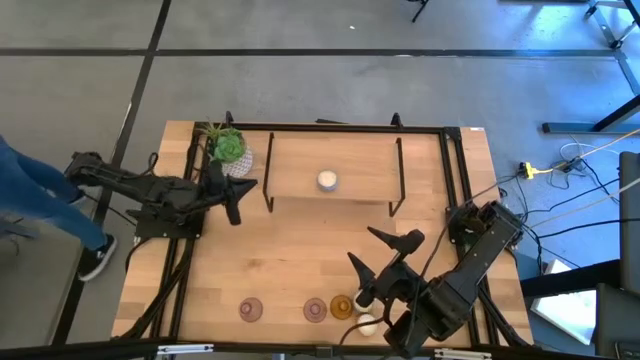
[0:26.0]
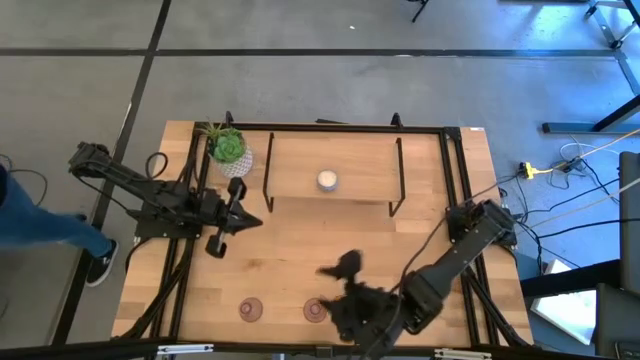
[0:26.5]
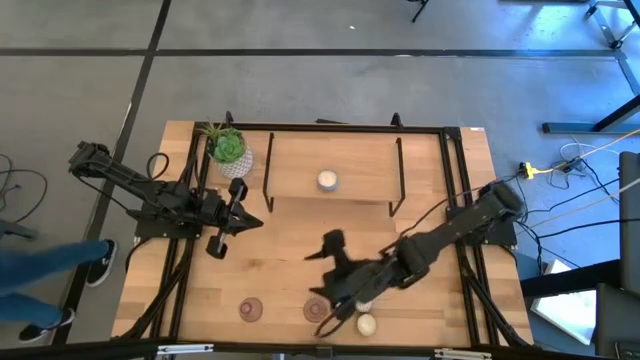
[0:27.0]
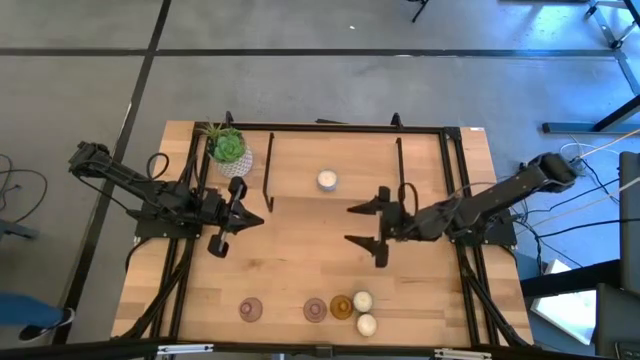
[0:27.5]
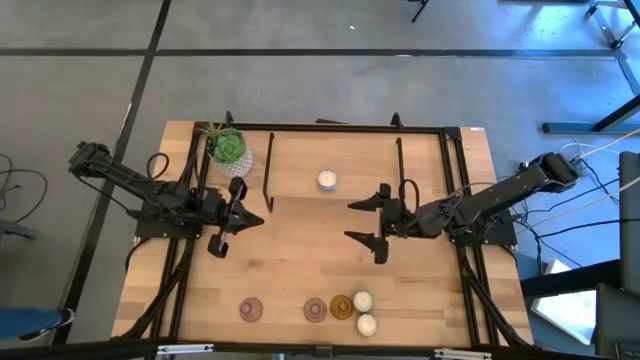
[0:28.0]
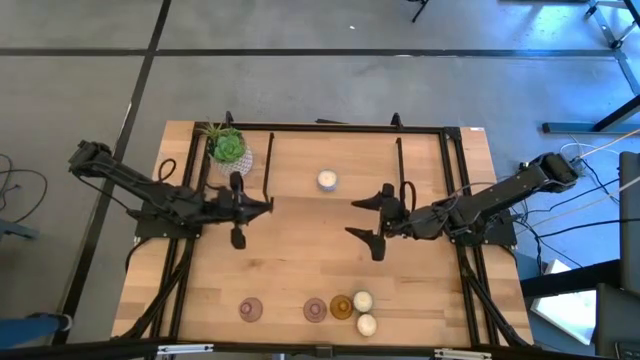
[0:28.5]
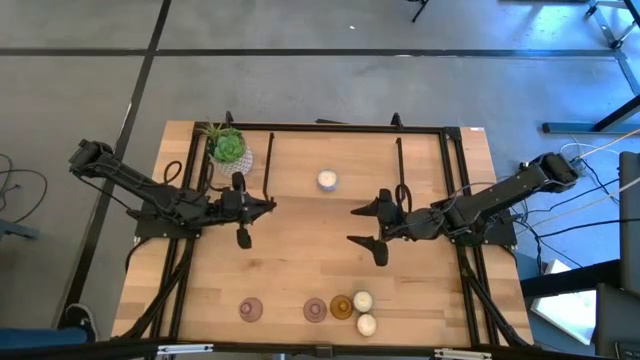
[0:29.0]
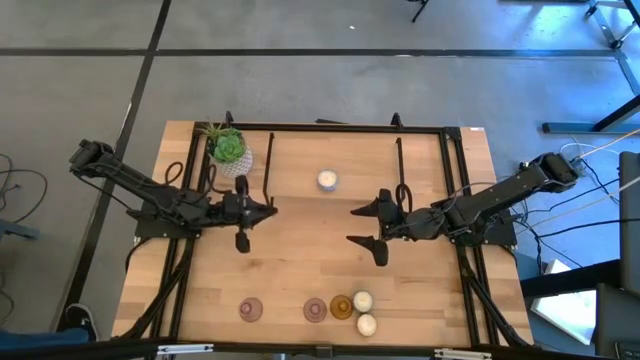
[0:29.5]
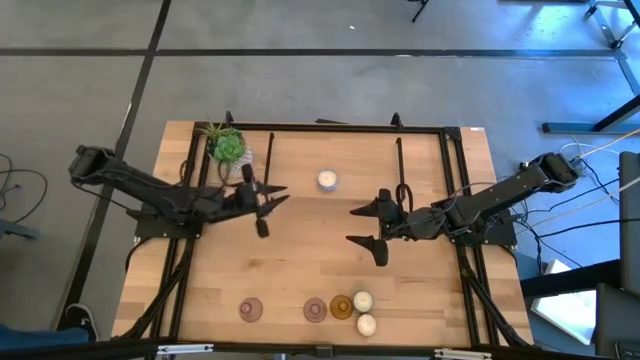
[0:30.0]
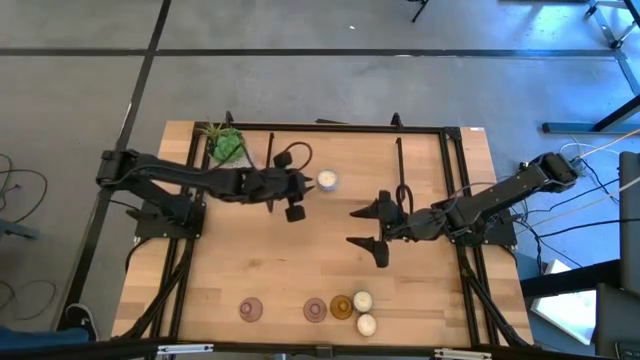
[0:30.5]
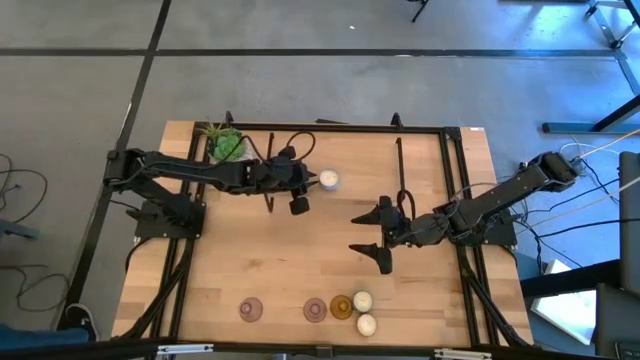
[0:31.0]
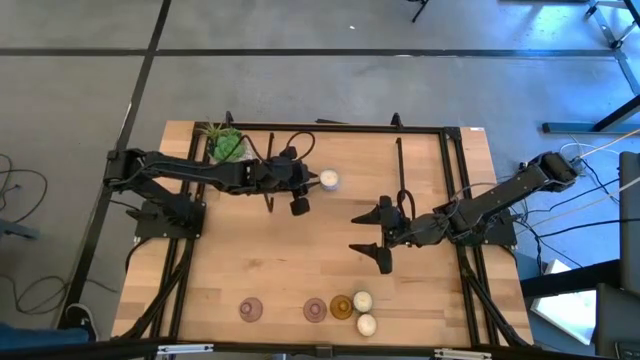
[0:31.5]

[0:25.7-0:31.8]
Task: Pick & Place candle stick holders
Adjust the light blue scented candle on the shelf

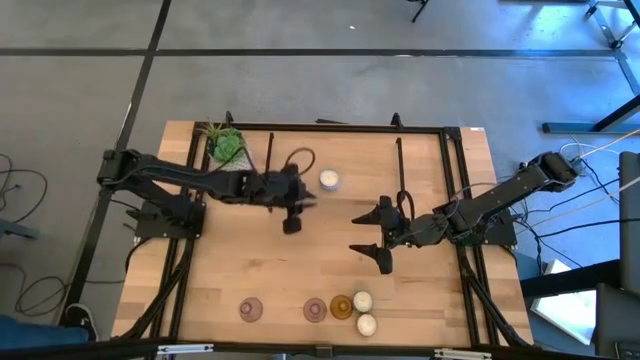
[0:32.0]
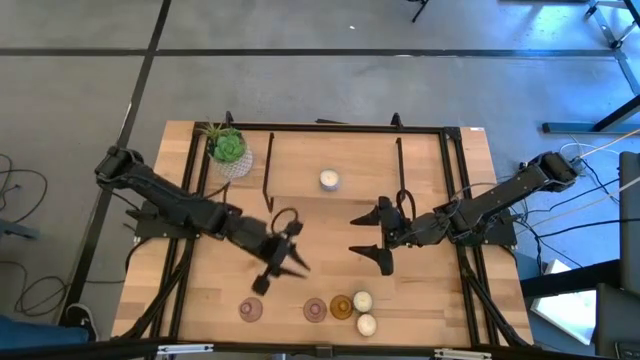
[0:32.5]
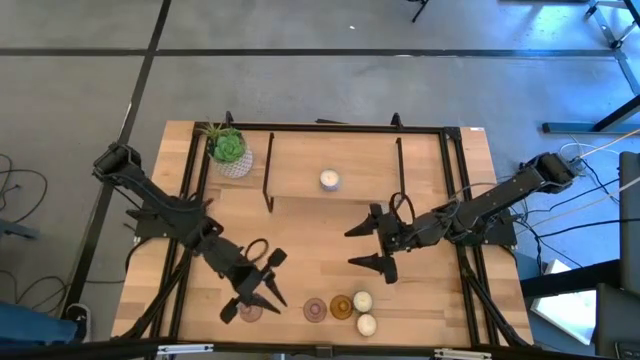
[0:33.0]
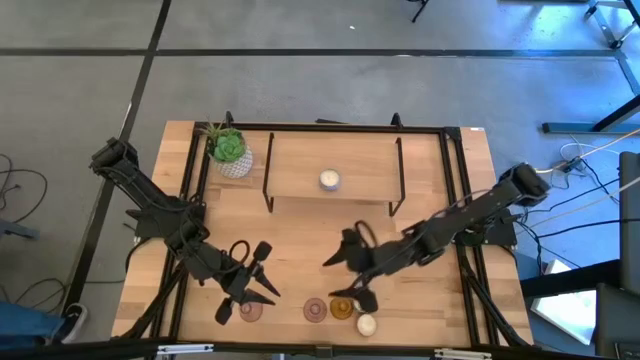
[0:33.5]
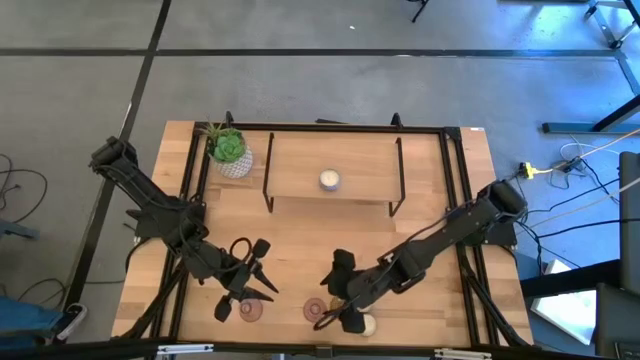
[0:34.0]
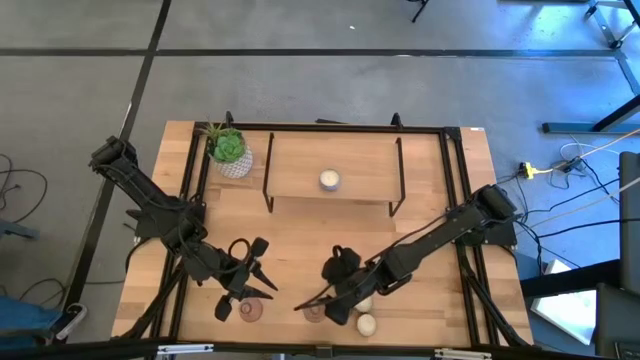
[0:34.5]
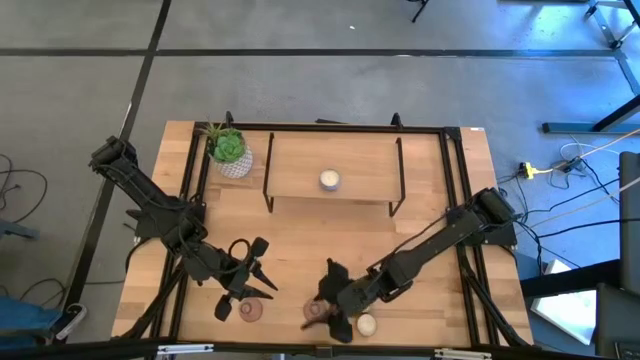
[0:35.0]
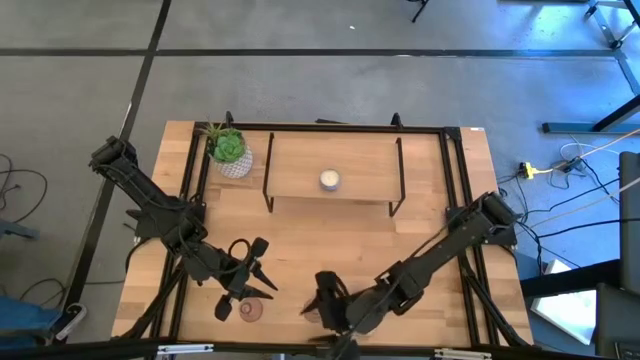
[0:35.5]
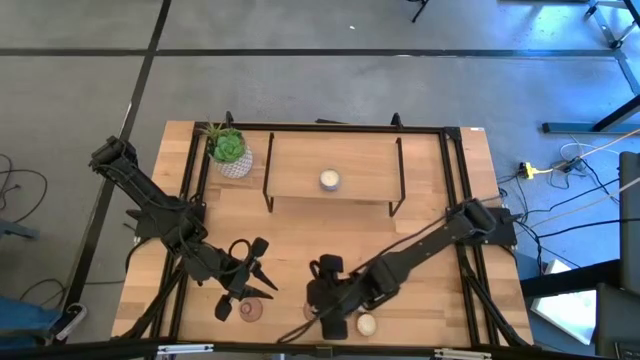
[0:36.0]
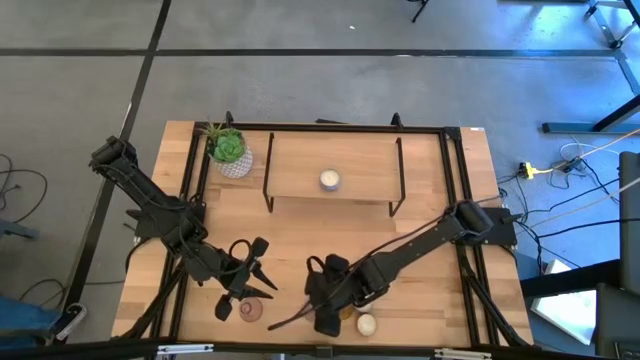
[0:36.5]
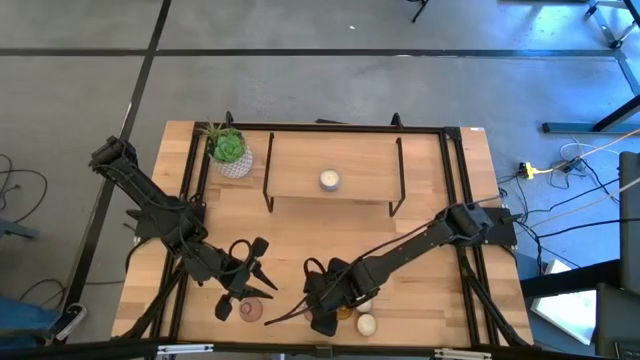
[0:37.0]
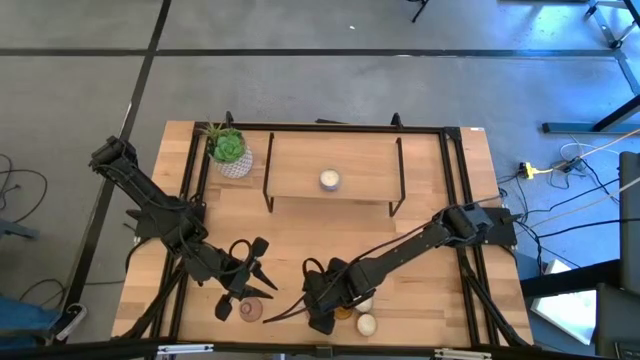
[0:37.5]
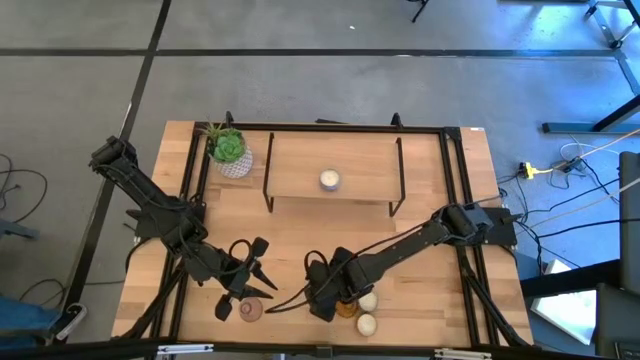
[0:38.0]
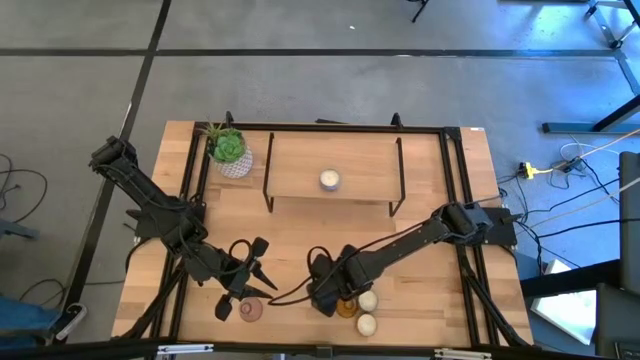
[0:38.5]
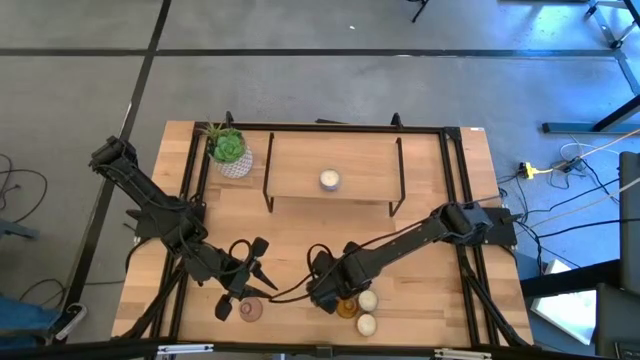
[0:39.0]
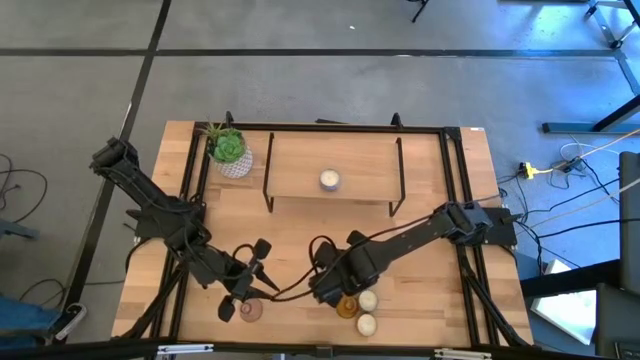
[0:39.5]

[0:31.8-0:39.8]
Put the right pink candle holder on the shelf

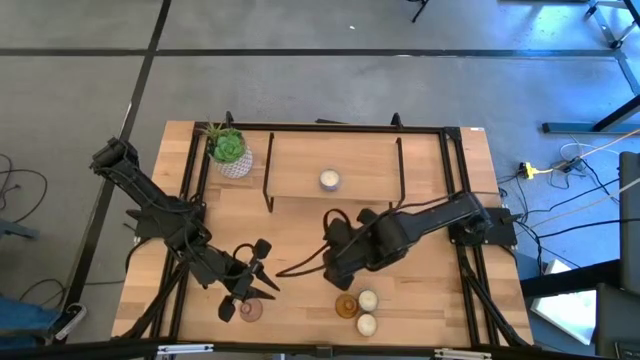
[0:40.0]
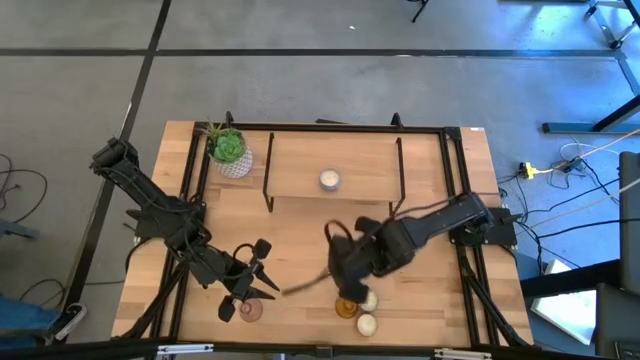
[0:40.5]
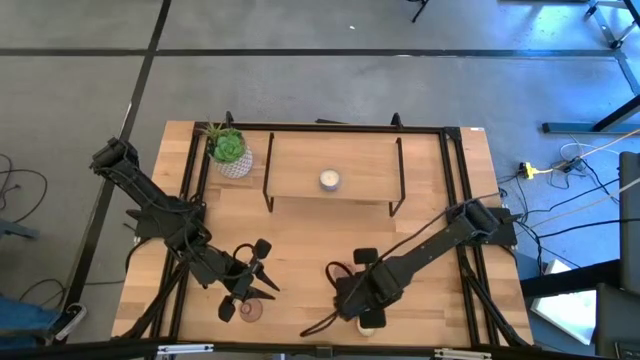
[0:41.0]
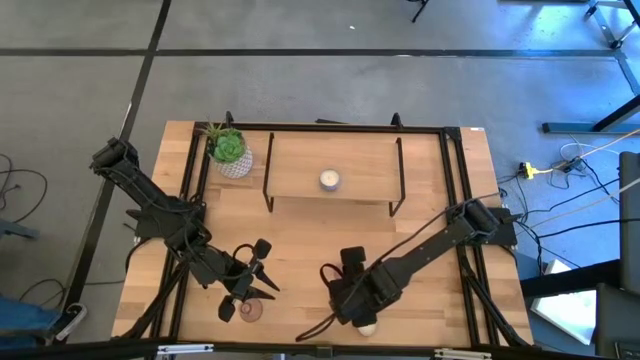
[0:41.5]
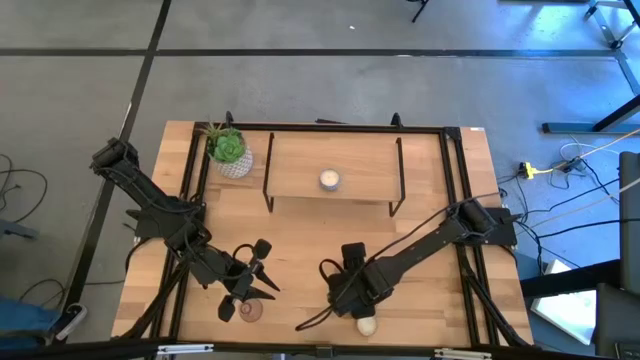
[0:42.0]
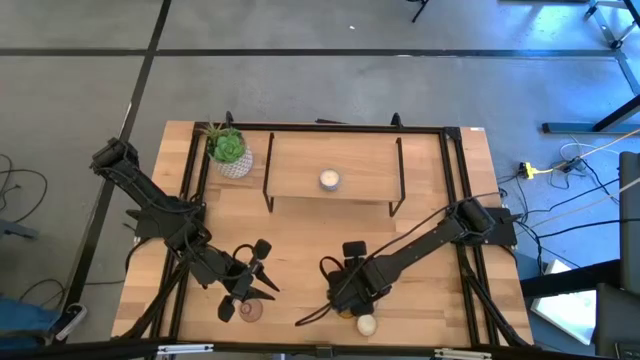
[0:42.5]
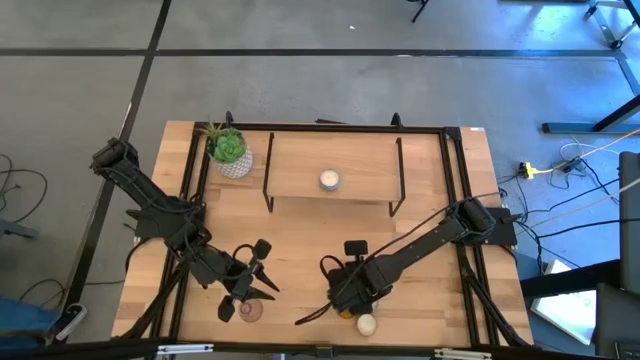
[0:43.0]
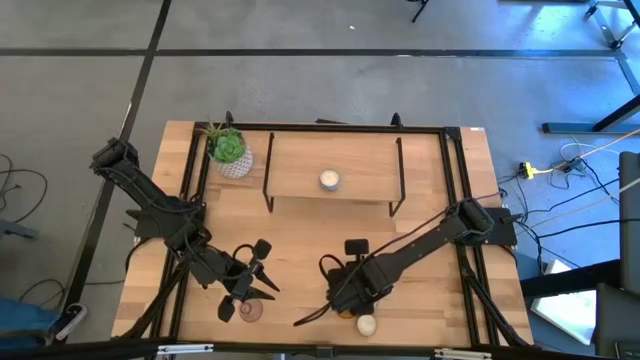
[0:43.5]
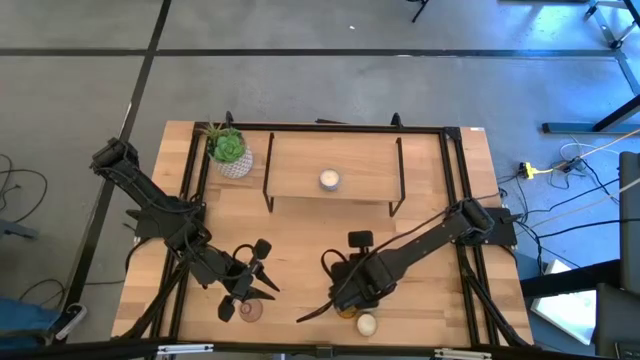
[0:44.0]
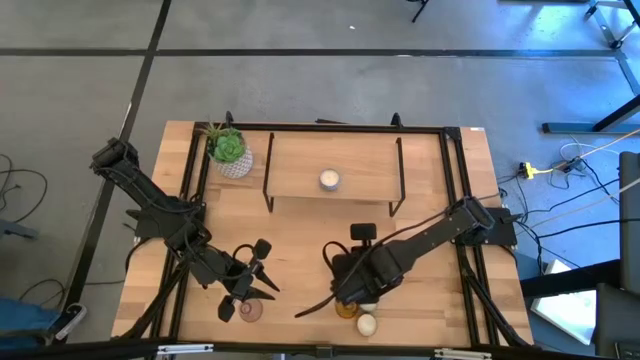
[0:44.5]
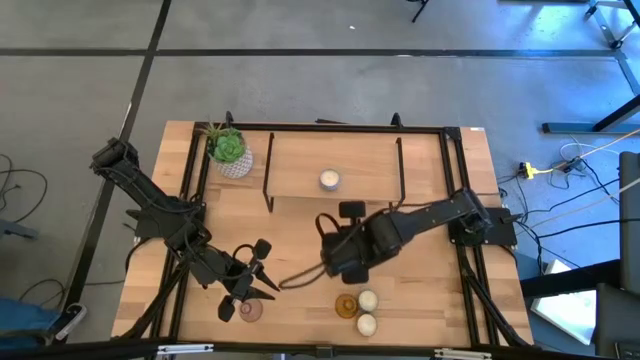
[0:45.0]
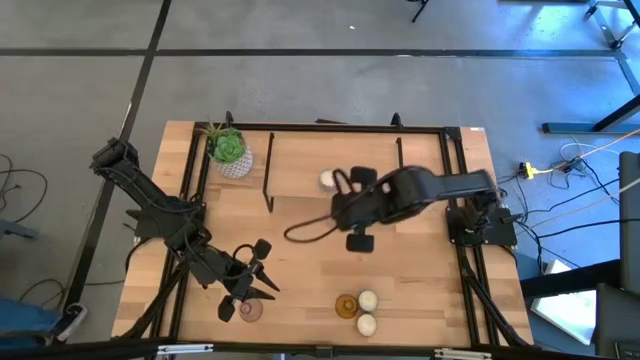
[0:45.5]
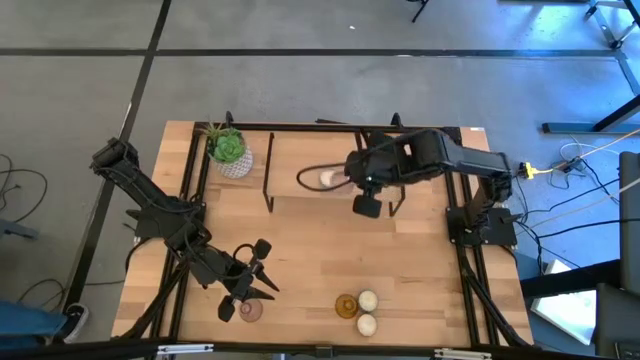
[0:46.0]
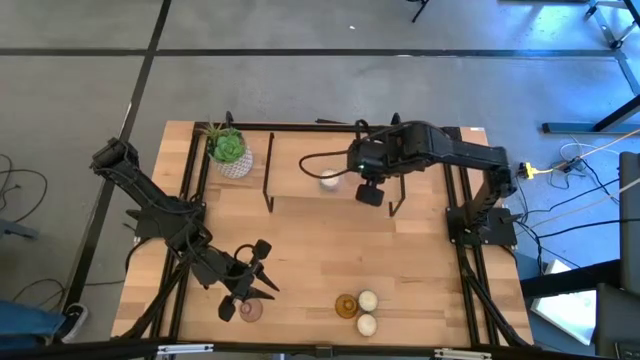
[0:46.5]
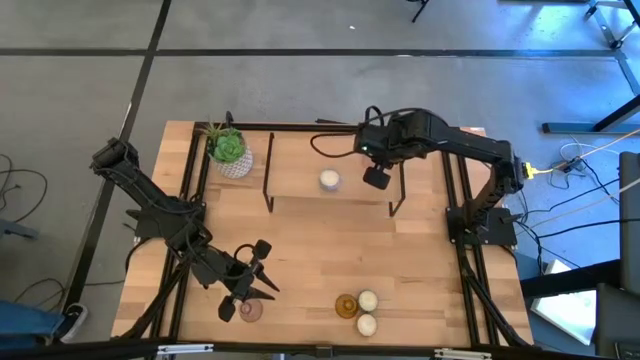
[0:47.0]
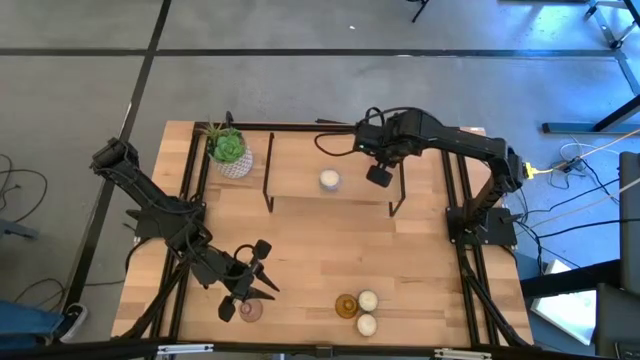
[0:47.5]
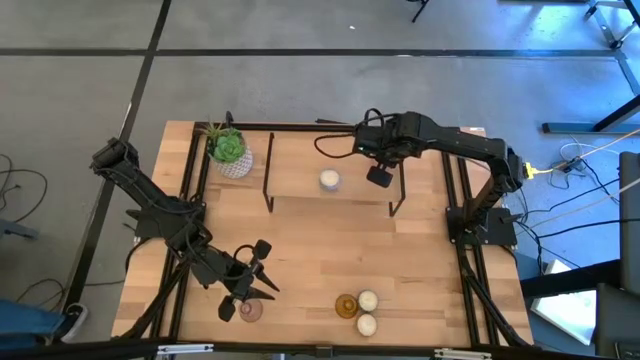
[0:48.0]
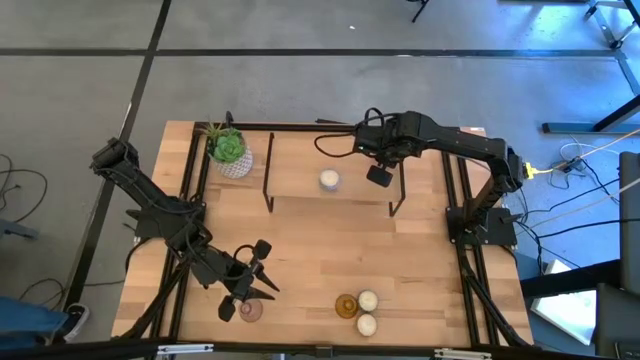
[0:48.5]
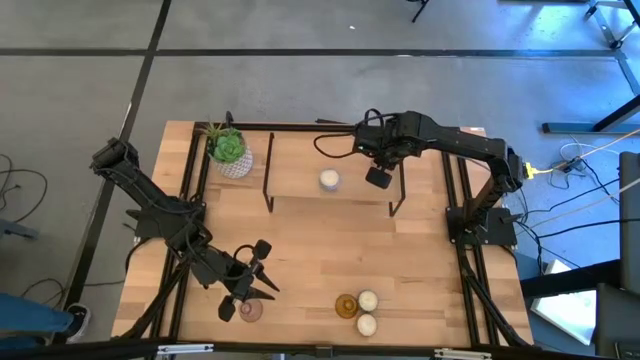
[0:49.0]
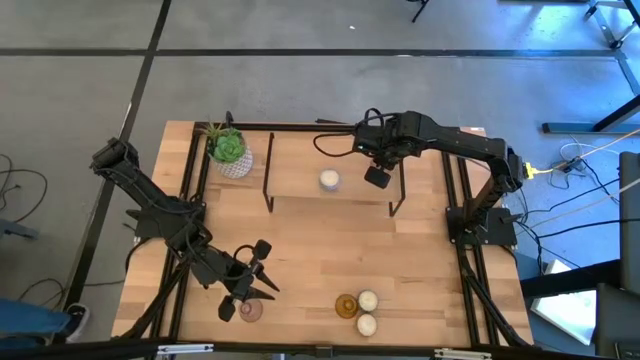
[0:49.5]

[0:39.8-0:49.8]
Put the right pink candle holder on the shelf
